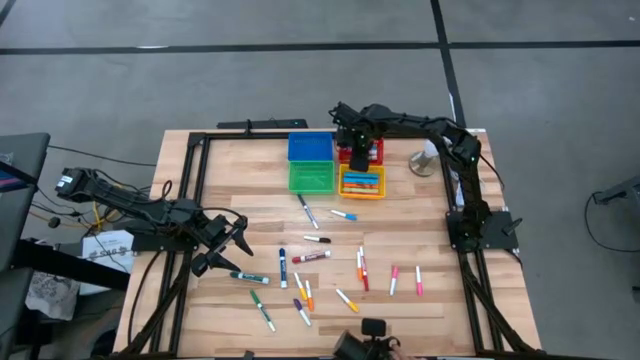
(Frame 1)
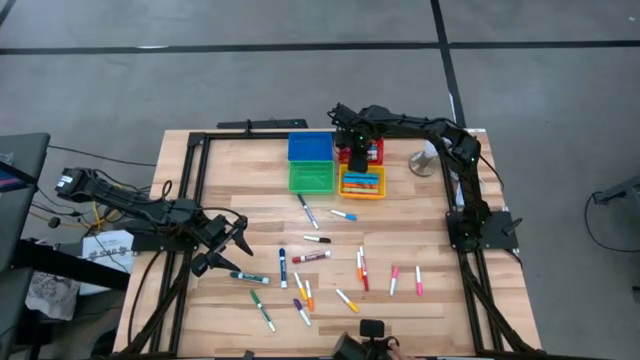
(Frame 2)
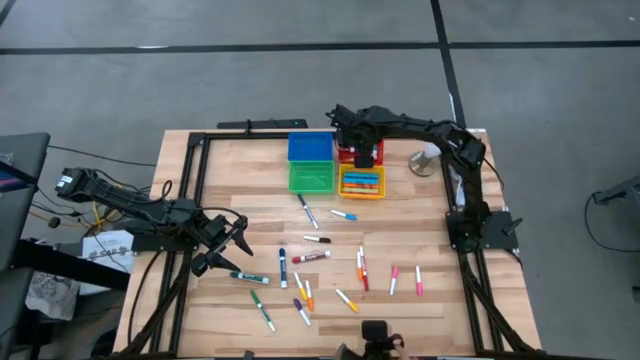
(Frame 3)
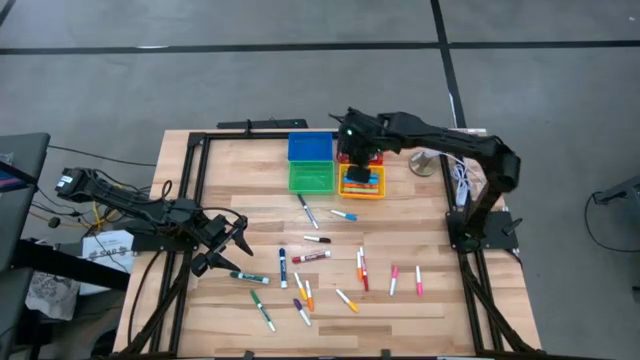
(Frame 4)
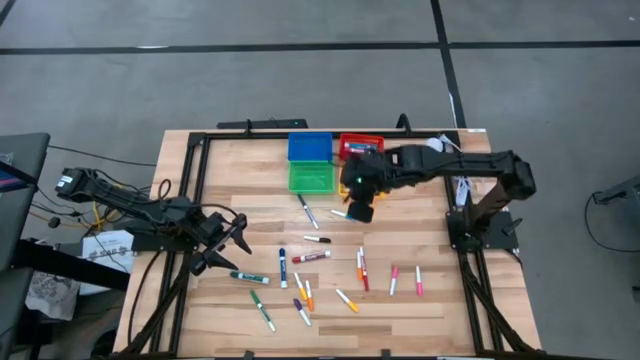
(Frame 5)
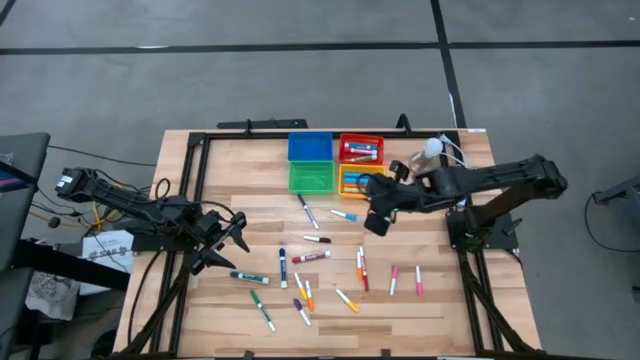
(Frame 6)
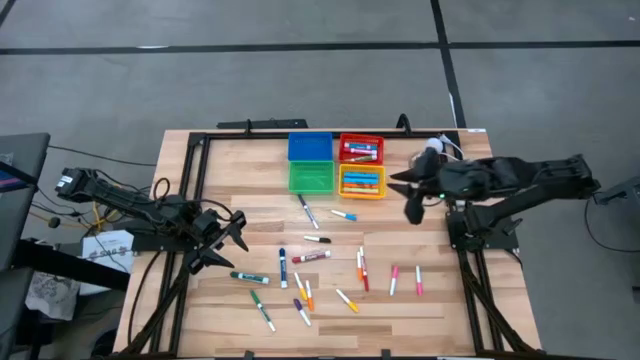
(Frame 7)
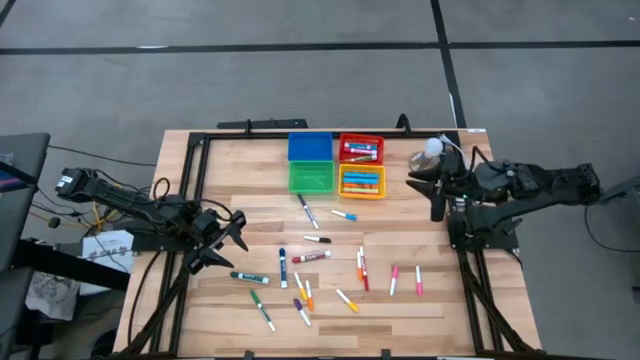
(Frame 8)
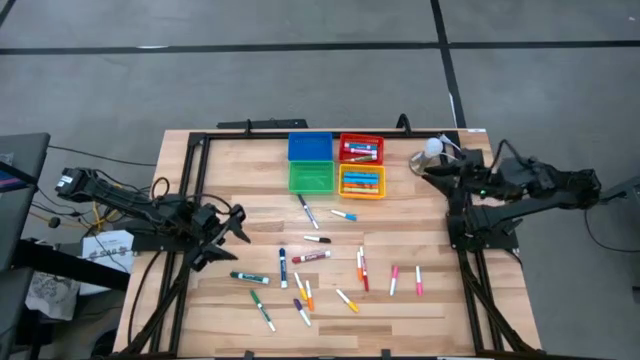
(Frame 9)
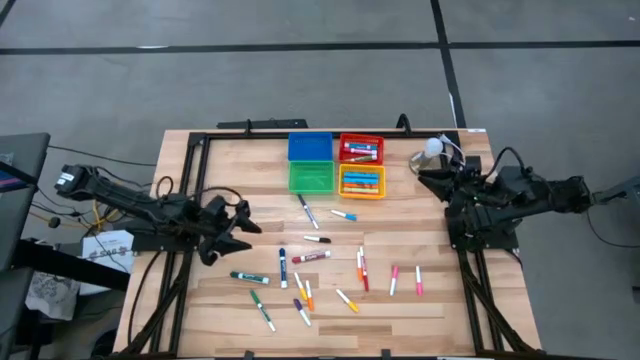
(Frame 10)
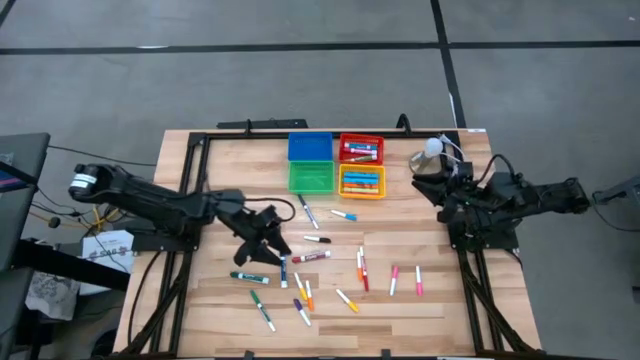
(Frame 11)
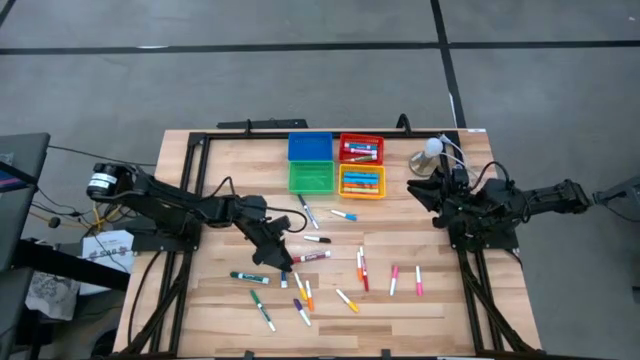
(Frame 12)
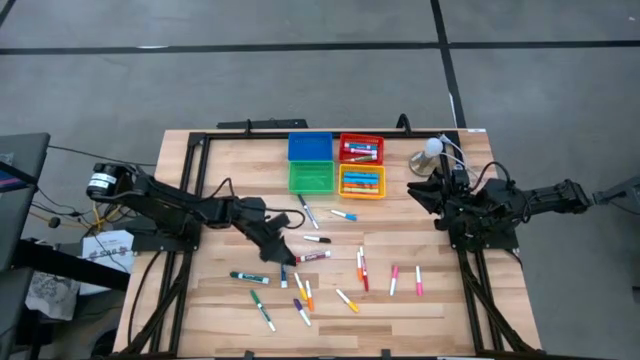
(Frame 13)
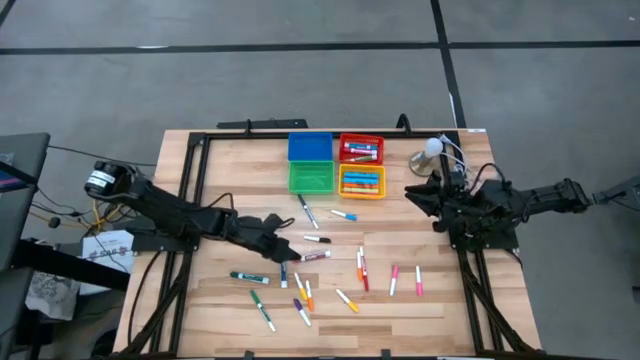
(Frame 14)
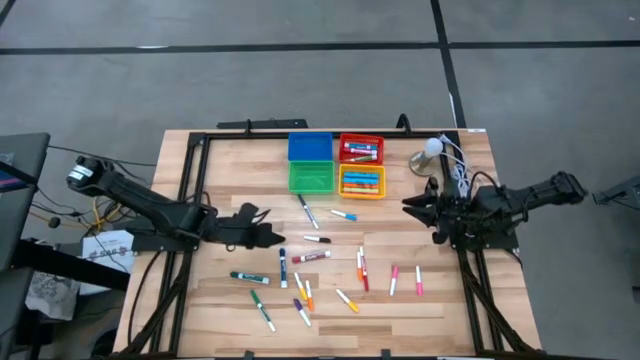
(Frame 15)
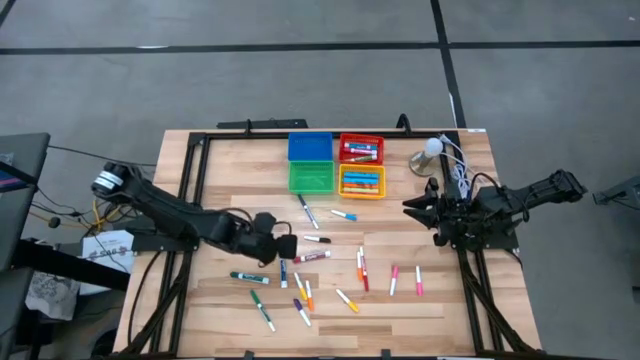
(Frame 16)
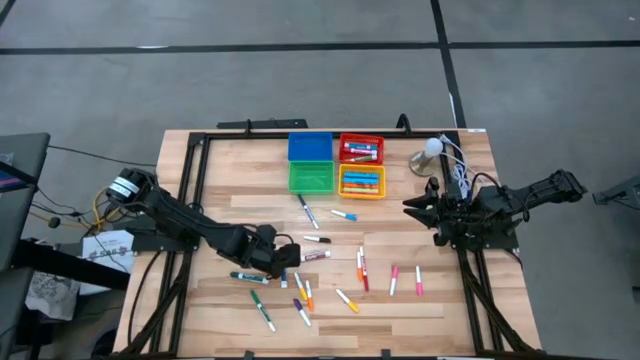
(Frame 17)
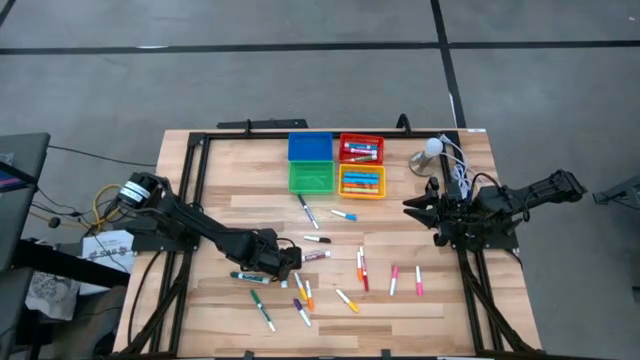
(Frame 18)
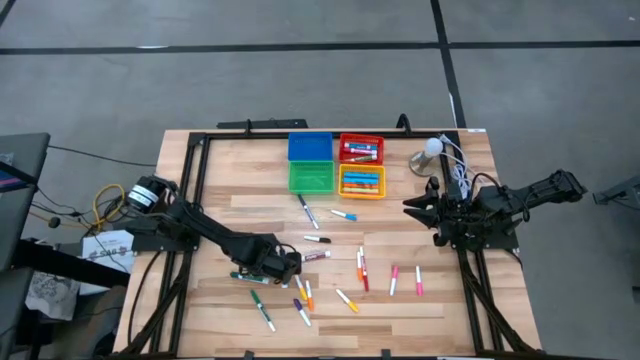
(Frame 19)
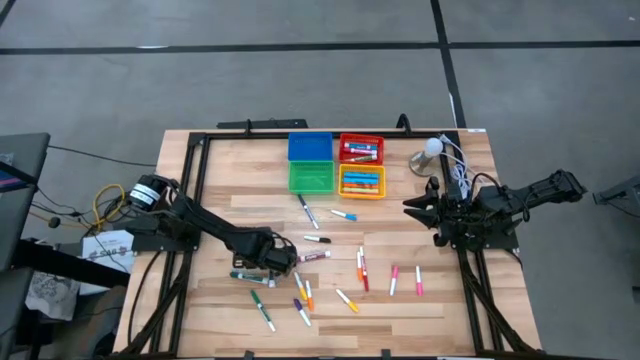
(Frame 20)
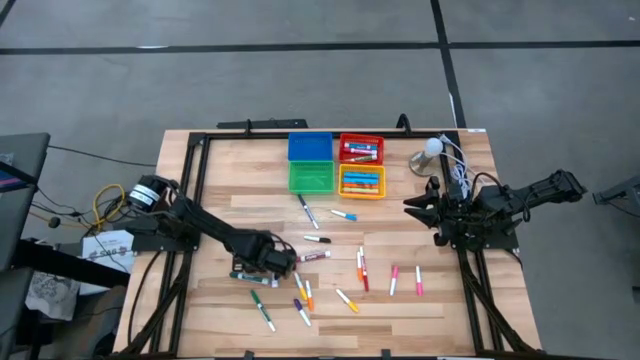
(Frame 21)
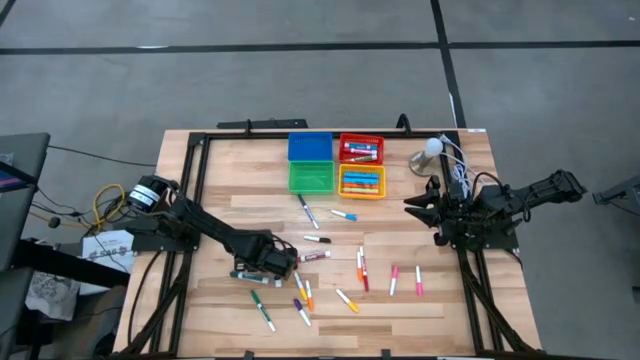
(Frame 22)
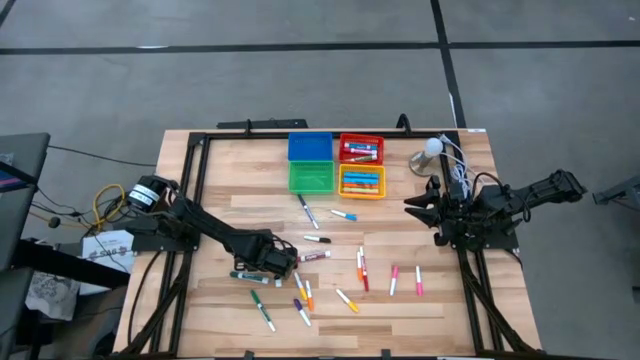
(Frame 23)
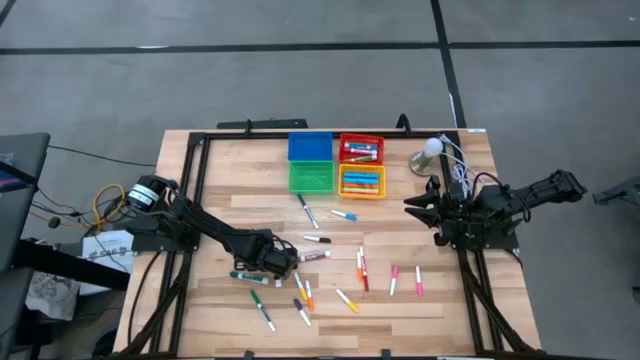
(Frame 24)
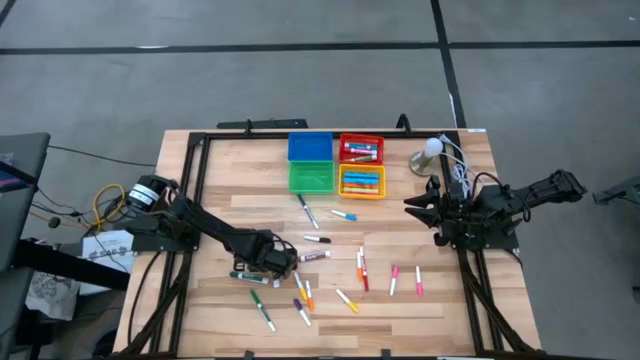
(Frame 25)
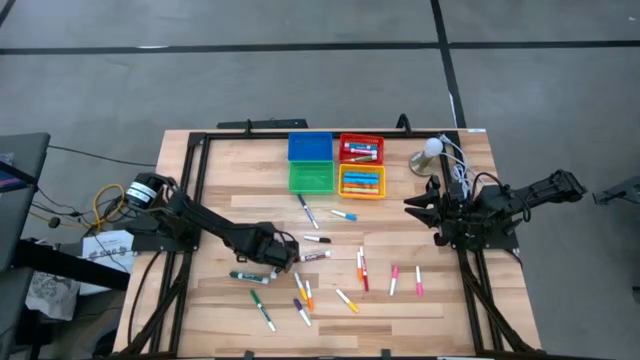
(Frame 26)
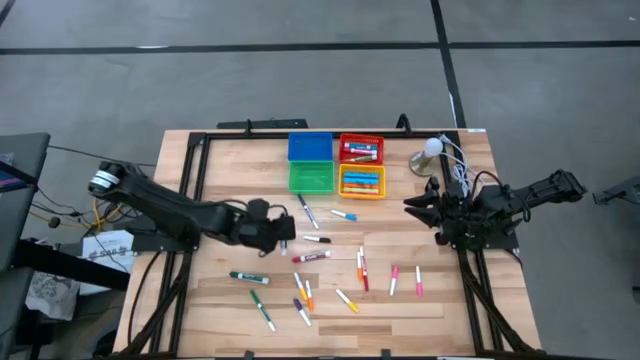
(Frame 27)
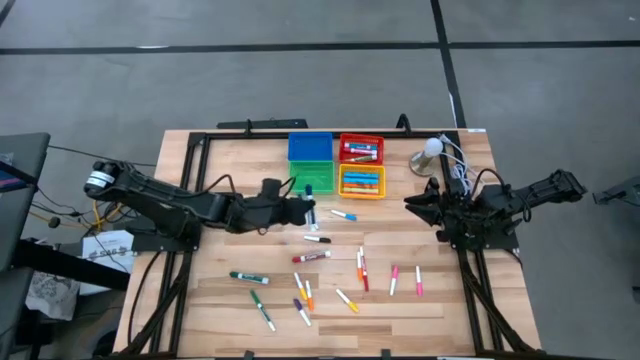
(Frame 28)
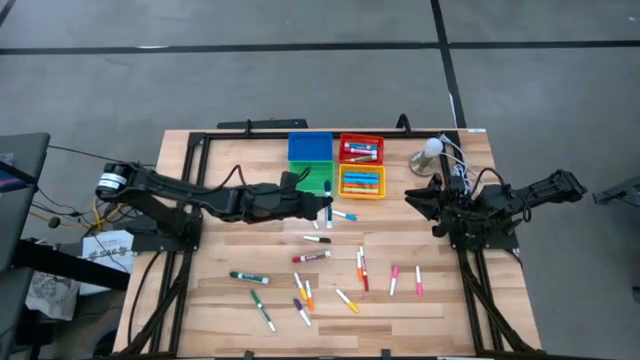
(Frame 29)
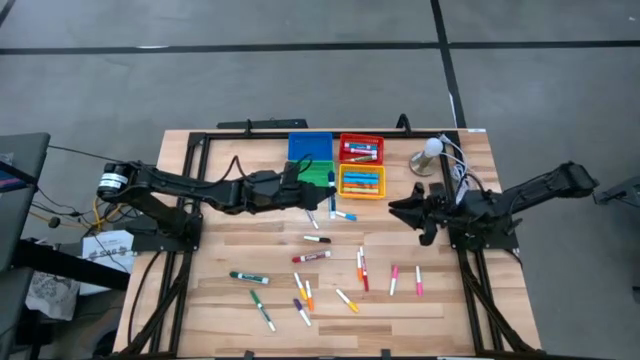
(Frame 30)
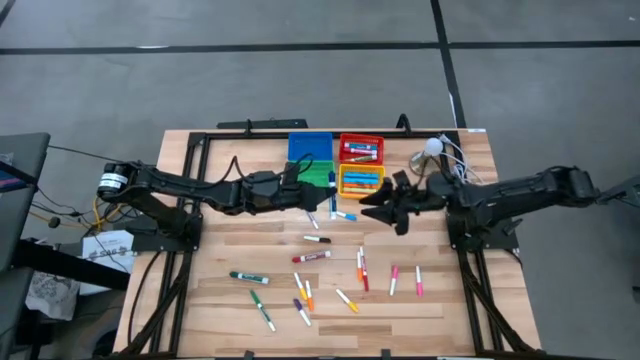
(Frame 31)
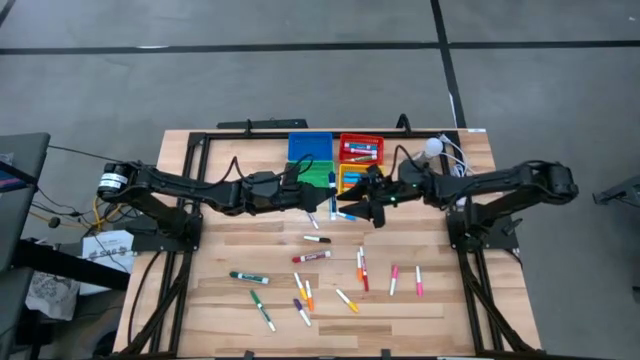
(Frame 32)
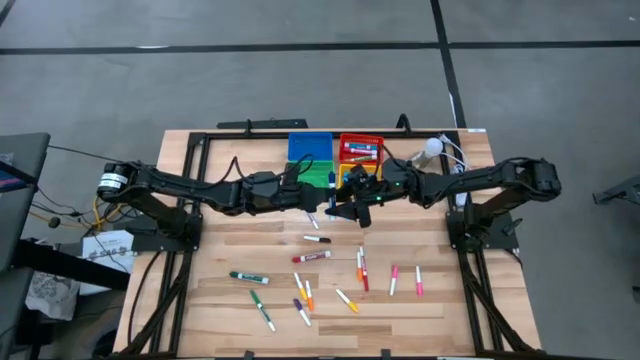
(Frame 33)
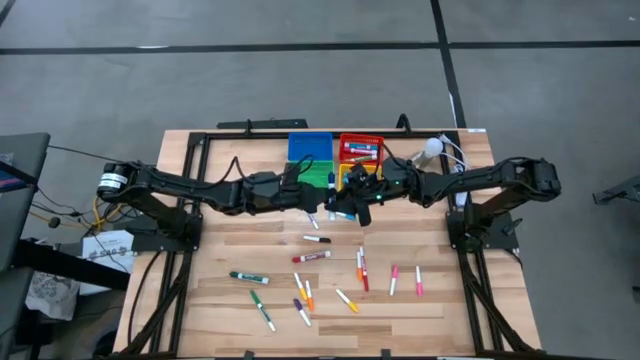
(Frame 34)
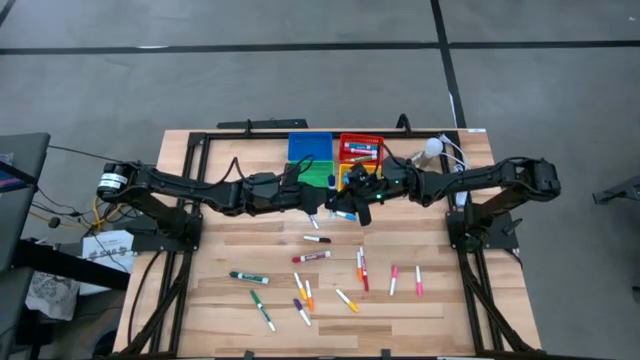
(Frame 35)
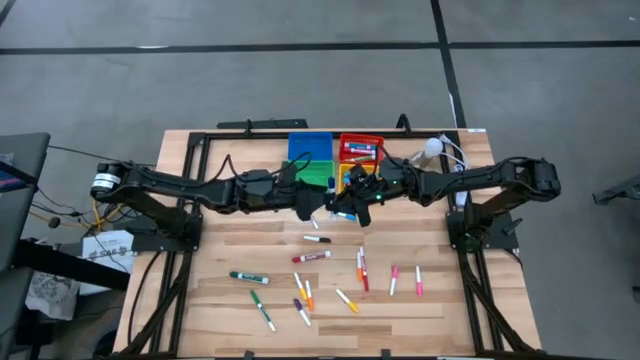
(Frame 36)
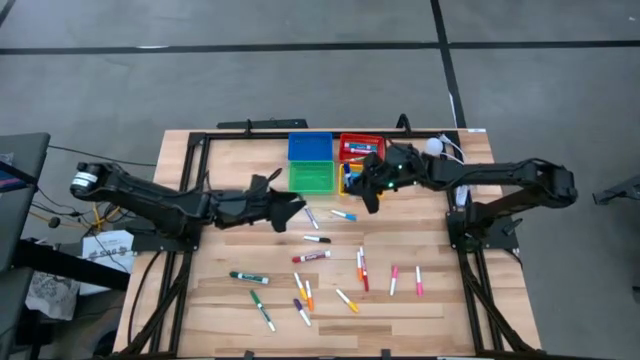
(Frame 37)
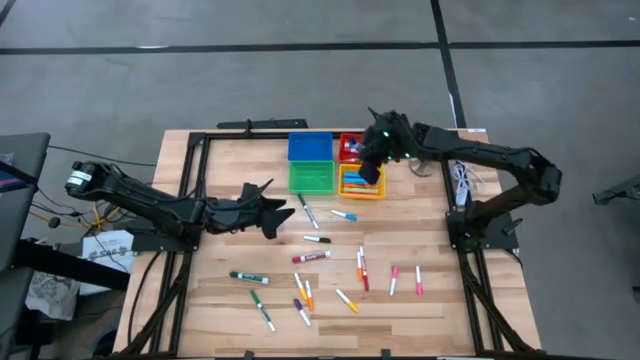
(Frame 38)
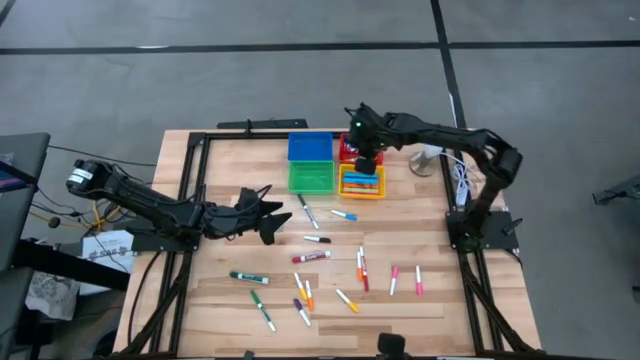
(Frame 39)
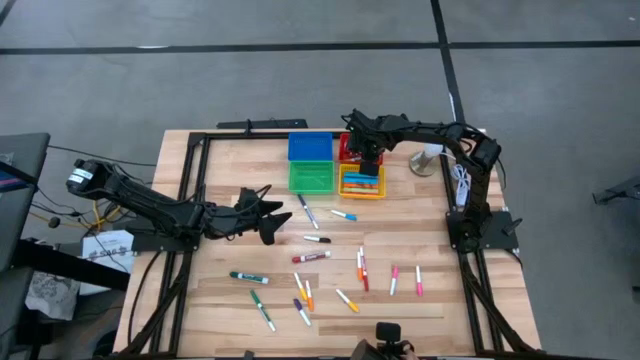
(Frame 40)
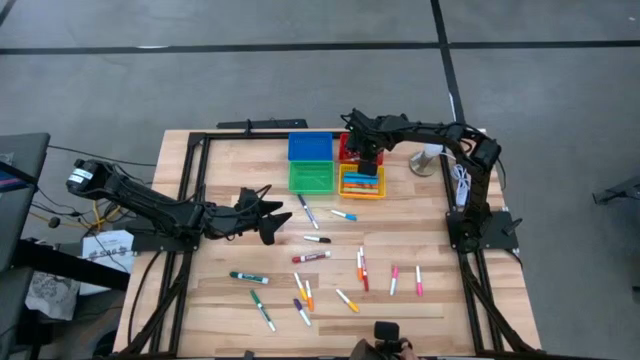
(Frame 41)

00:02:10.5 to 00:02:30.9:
Task: Pick & Place Markers
Put the large dark blue marker pen into the red bin
